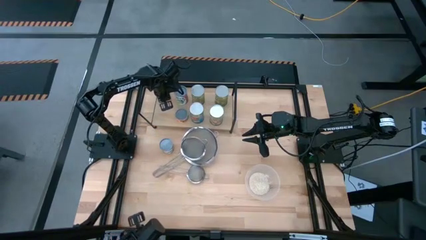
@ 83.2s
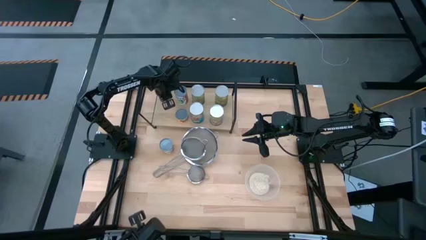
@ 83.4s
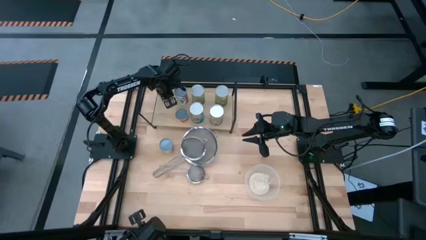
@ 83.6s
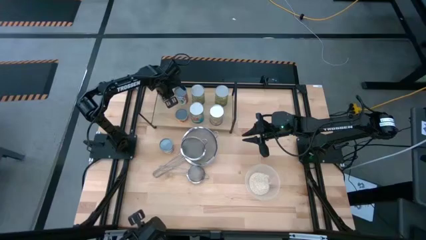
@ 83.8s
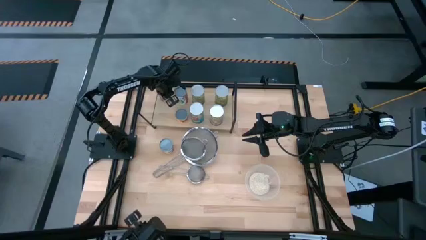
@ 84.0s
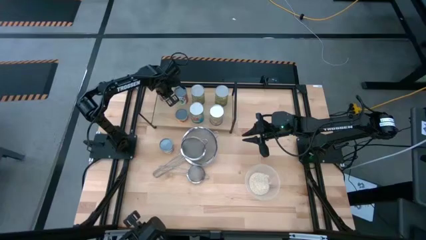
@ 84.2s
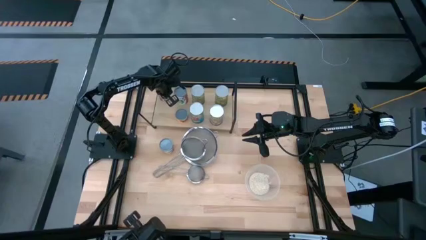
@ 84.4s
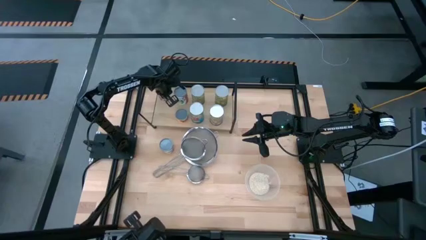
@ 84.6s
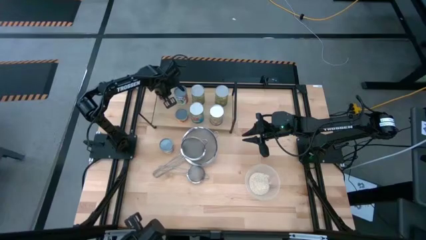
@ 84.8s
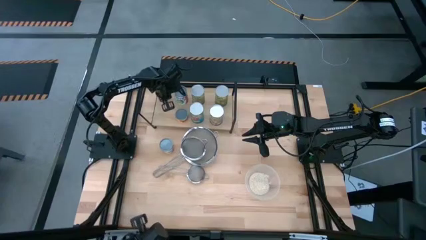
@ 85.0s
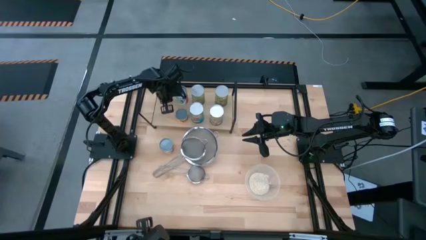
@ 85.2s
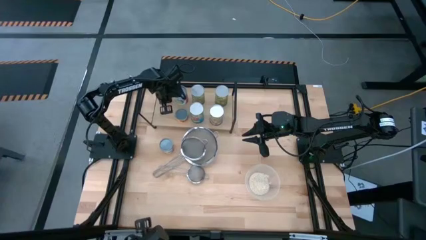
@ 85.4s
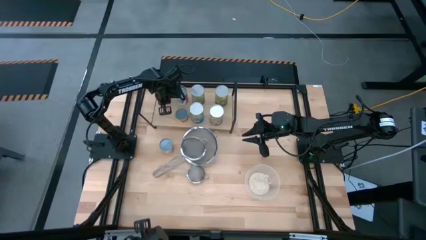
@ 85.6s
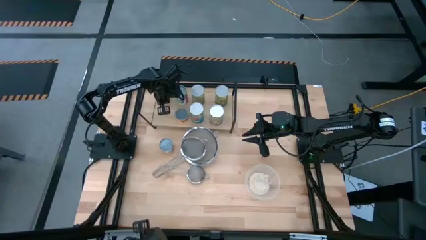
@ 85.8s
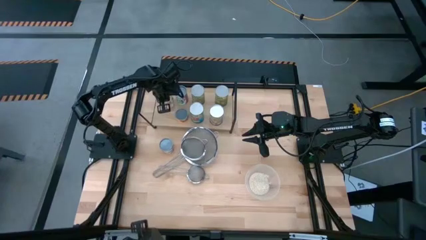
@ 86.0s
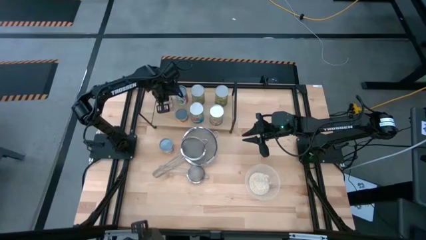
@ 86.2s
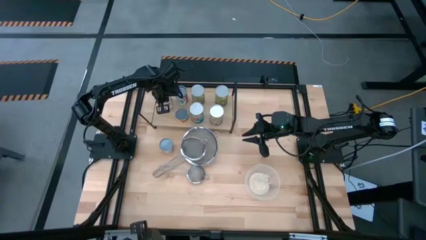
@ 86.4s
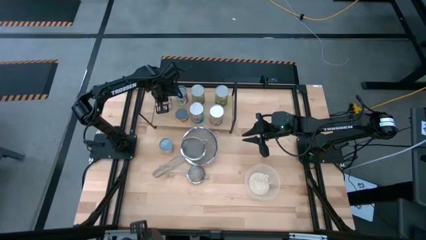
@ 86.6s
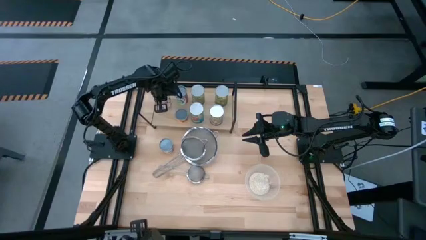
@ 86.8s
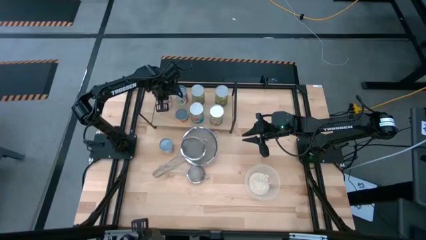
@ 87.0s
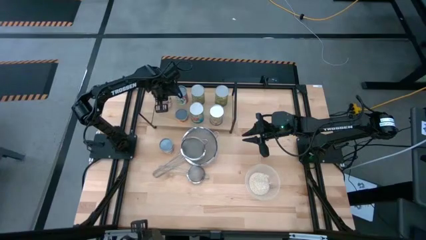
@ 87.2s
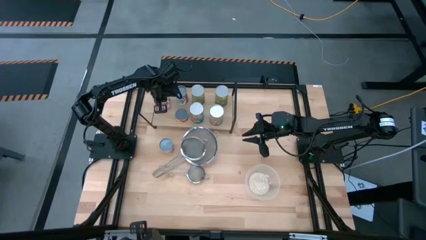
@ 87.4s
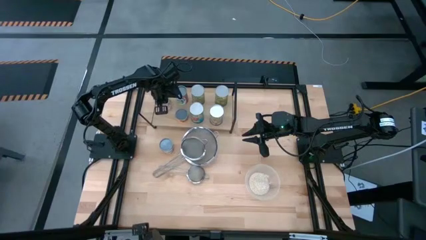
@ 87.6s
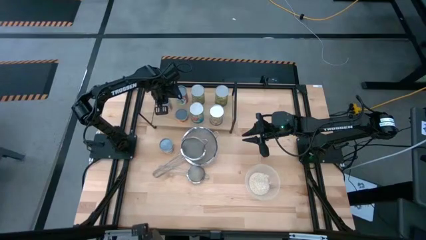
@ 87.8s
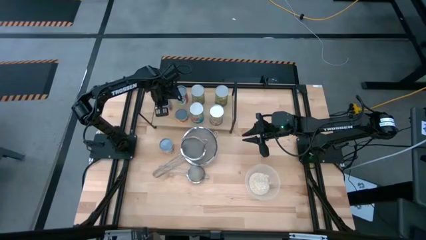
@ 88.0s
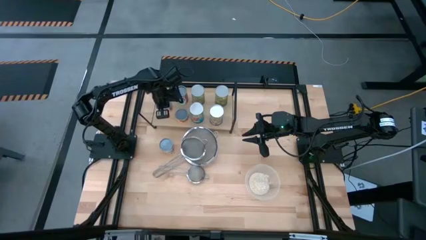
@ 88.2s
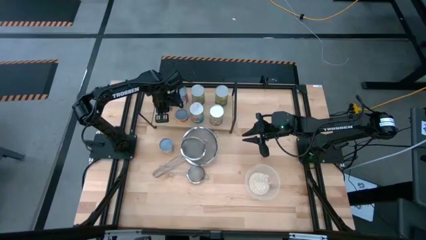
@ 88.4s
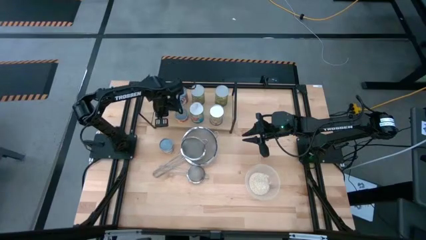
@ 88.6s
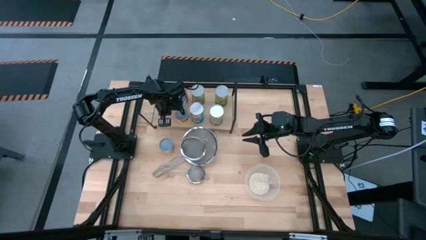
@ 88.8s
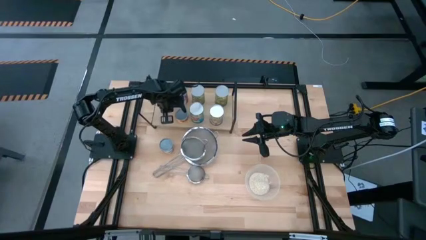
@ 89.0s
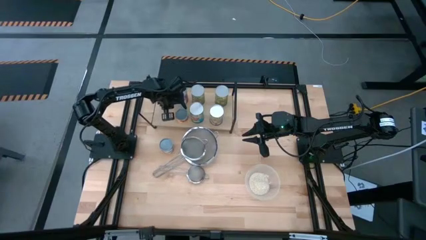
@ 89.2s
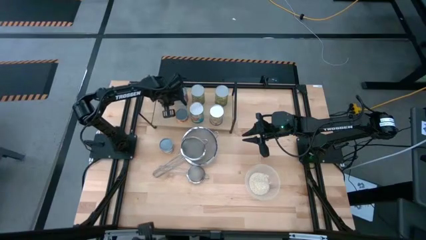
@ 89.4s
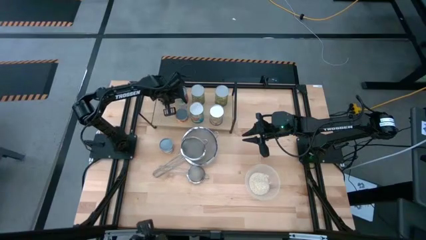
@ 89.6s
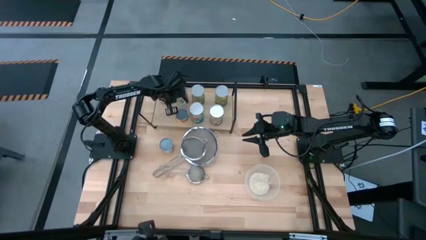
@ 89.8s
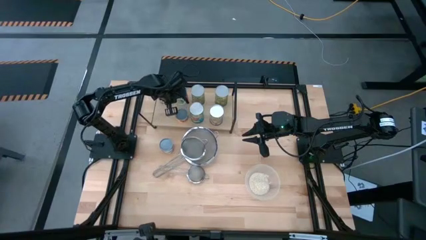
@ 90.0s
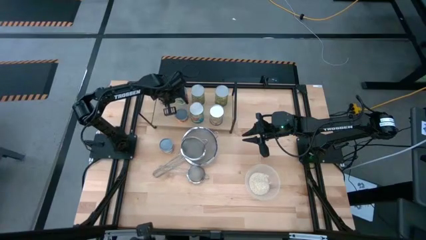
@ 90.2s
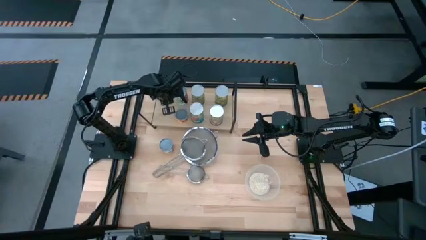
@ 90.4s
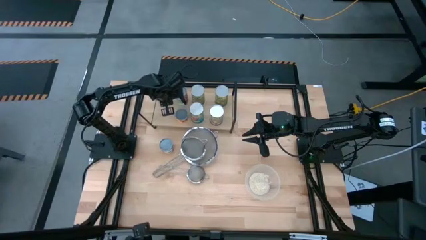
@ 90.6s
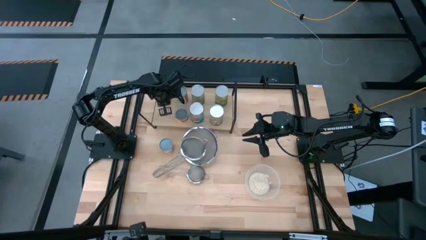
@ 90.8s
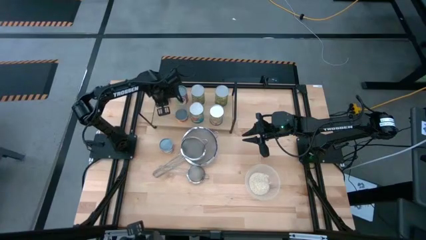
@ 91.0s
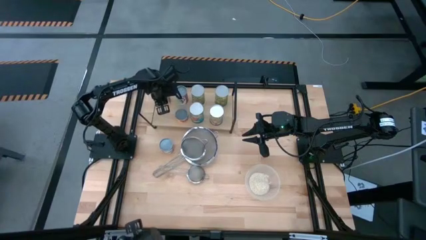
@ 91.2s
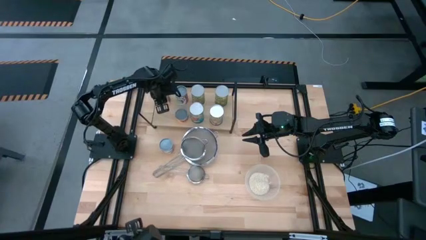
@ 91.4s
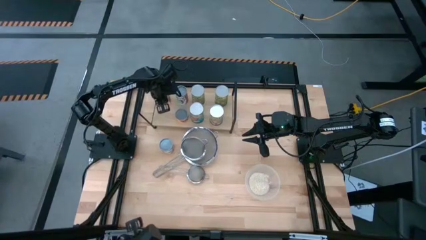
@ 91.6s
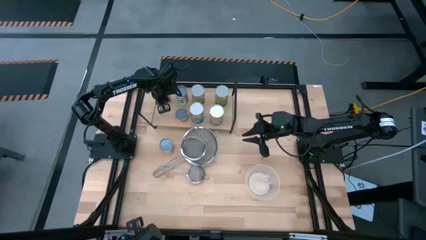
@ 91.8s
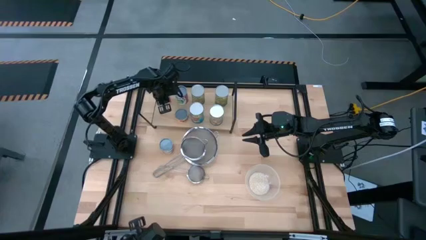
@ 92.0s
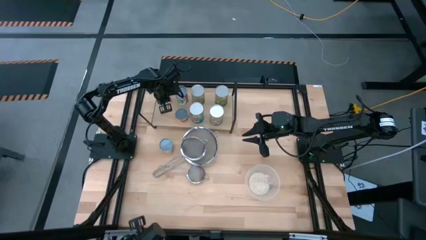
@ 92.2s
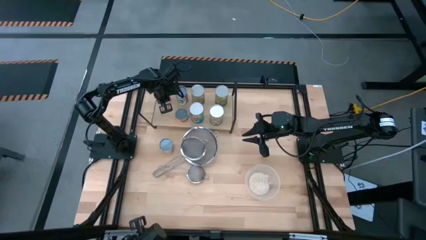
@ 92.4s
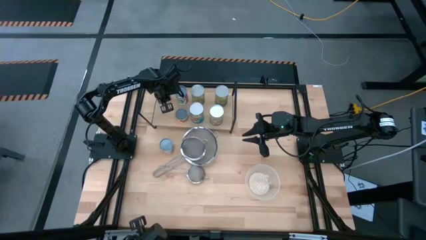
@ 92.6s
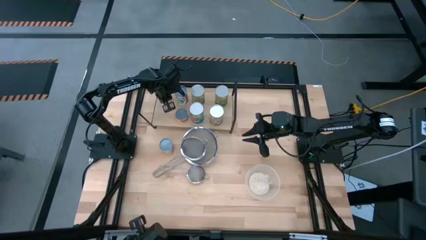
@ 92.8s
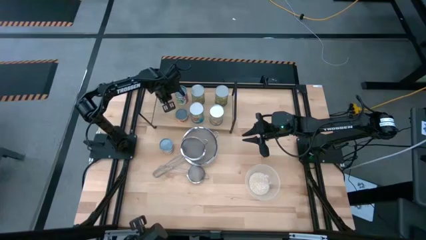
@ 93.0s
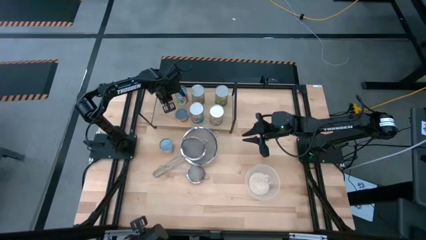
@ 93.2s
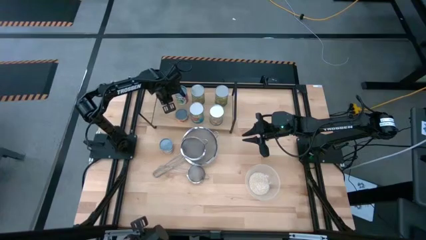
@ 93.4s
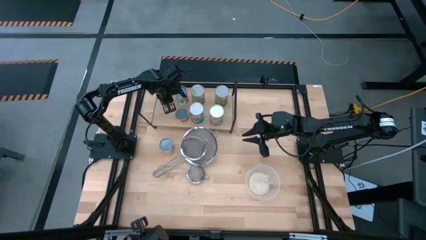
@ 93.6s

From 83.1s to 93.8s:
Task: Pick and place cans onto a shelf
Put the diced tomatoes on the shelf

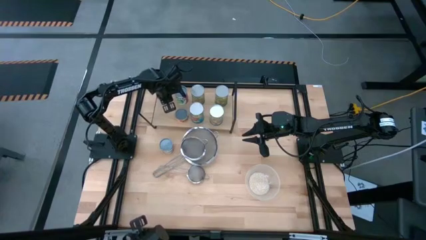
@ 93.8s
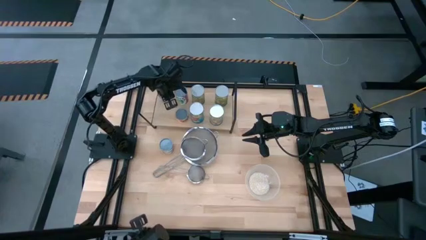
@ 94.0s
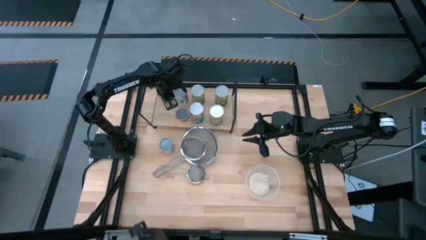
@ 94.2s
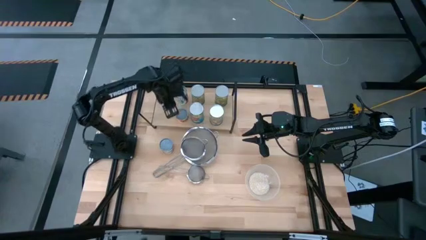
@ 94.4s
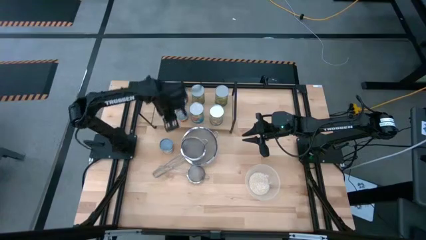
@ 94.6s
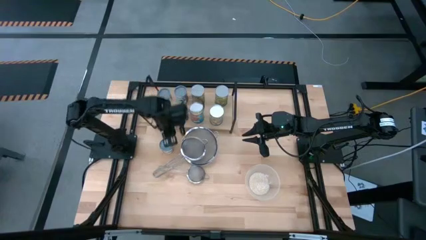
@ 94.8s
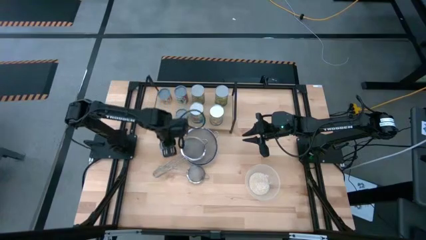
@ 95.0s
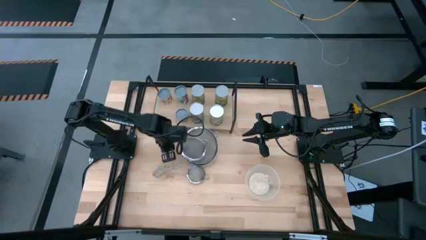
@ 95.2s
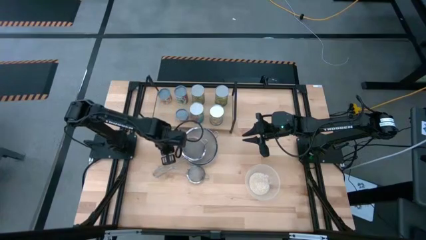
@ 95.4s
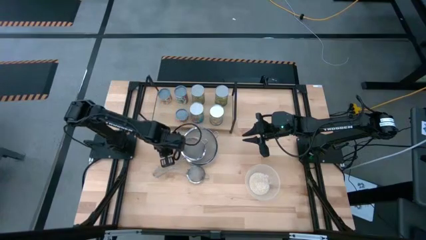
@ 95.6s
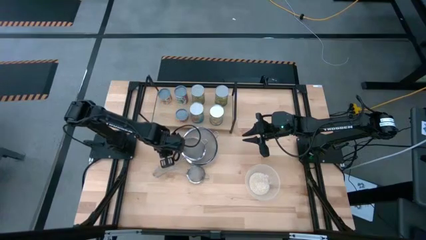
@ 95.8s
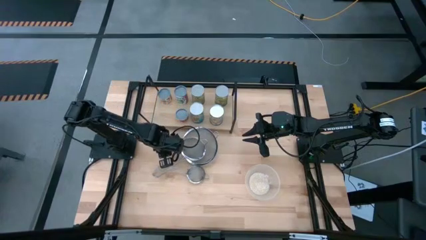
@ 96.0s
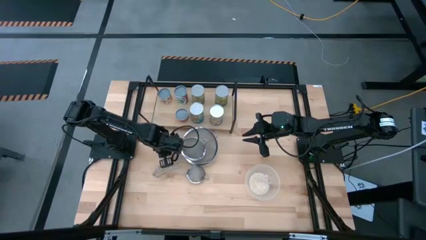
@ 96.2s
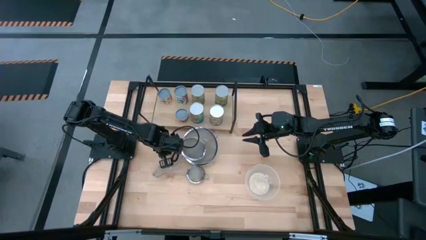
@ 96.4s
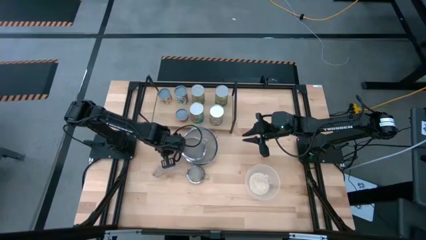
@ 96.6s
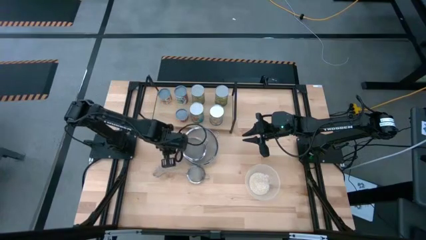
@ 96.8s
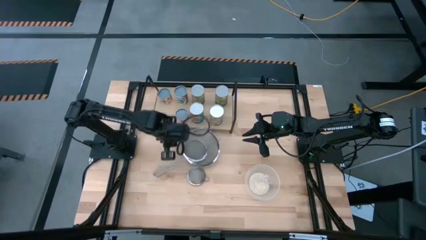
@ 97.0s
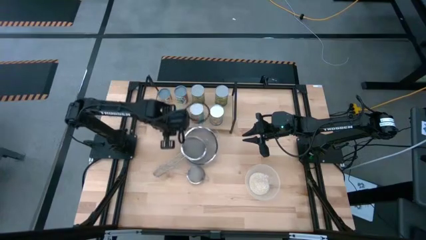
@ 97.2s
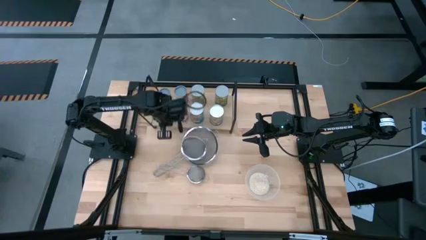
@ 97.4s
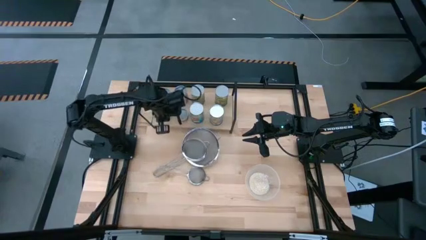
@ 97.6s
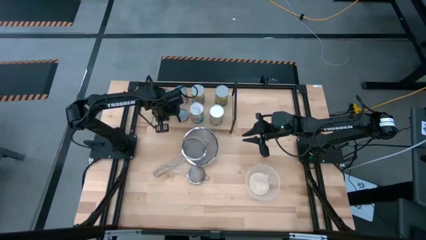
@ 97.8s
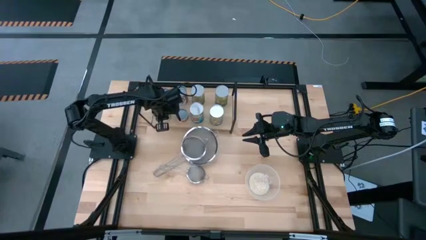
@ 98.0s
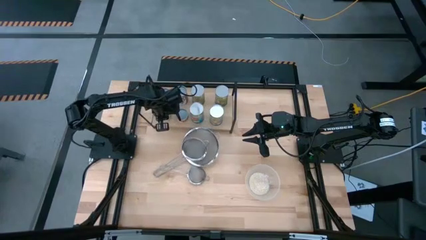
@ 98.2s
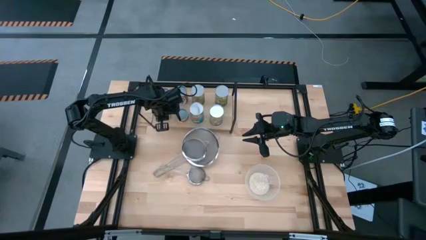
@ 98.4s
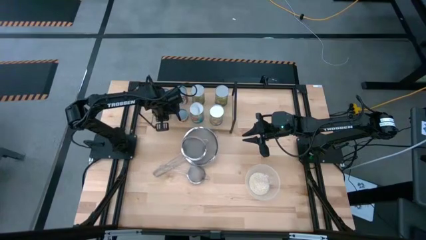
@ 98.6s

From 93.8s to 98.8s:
Put the small canned oranges on the shelf
